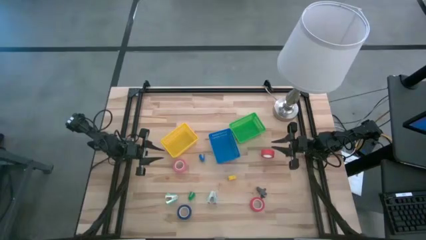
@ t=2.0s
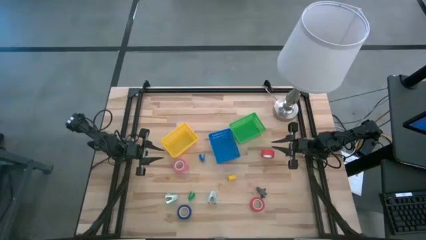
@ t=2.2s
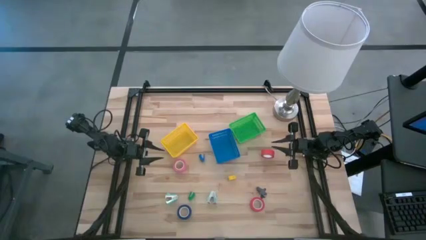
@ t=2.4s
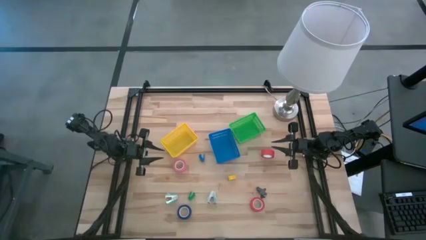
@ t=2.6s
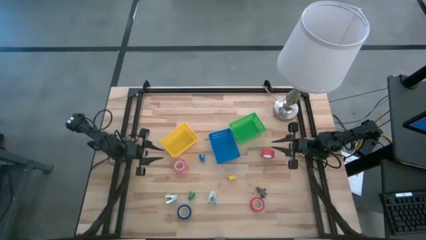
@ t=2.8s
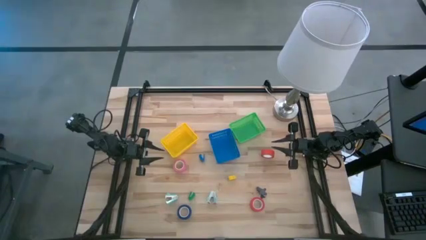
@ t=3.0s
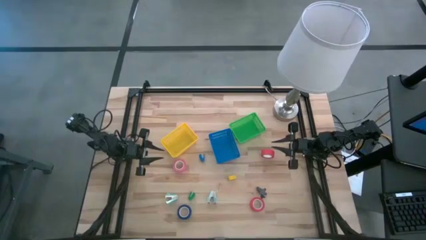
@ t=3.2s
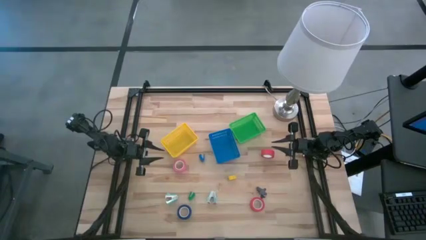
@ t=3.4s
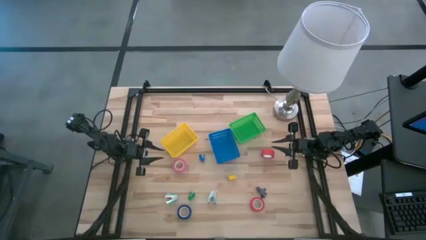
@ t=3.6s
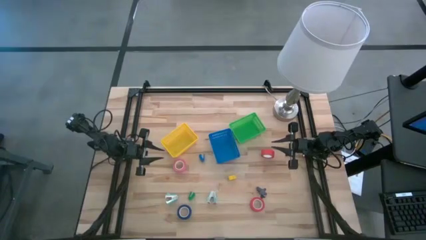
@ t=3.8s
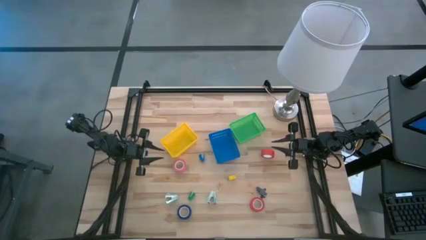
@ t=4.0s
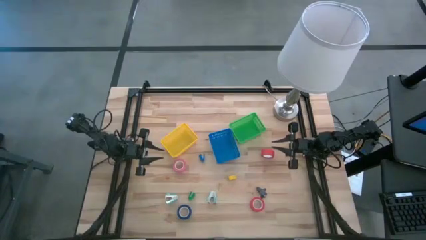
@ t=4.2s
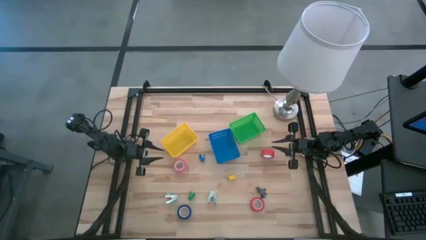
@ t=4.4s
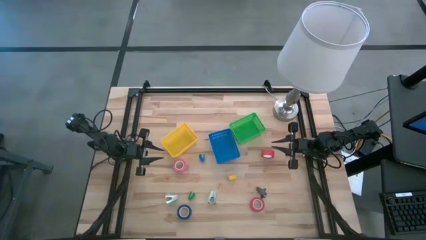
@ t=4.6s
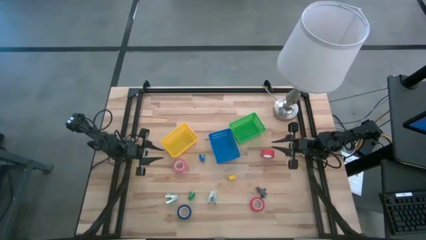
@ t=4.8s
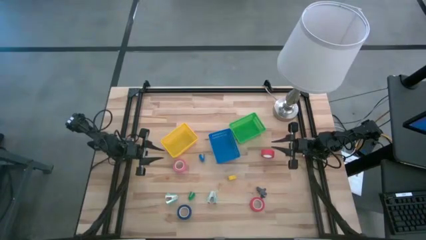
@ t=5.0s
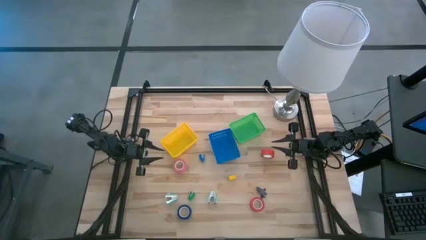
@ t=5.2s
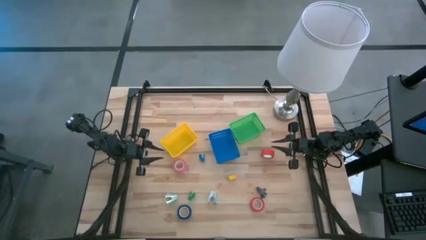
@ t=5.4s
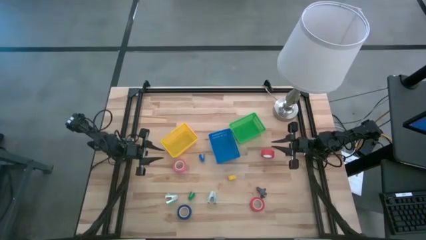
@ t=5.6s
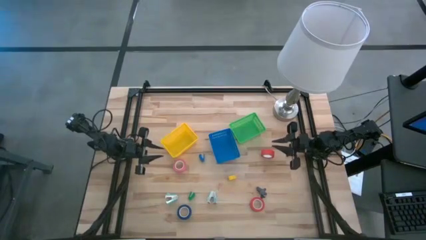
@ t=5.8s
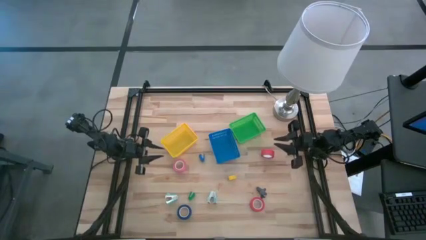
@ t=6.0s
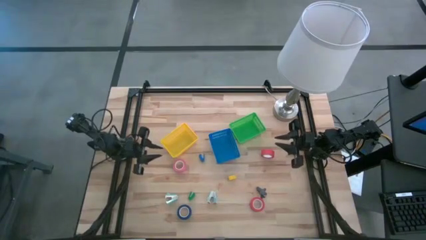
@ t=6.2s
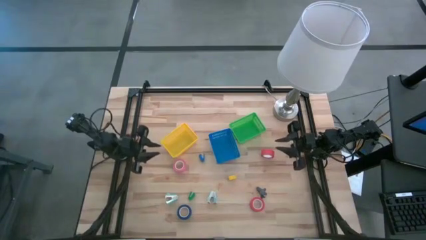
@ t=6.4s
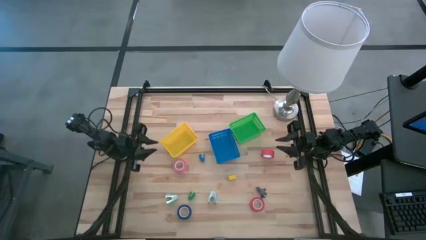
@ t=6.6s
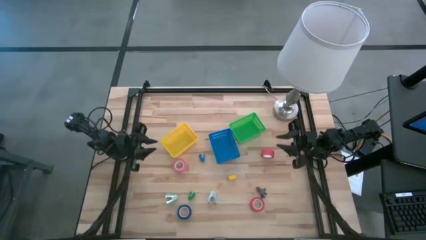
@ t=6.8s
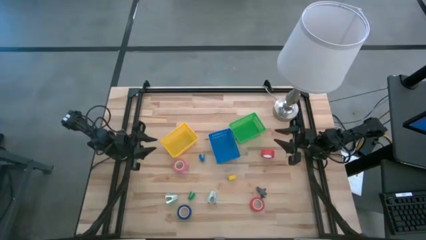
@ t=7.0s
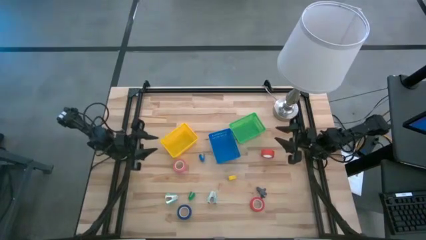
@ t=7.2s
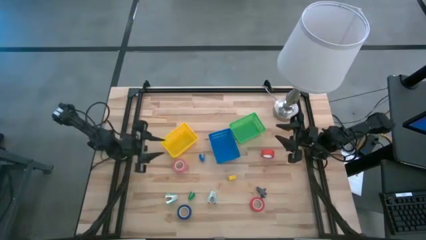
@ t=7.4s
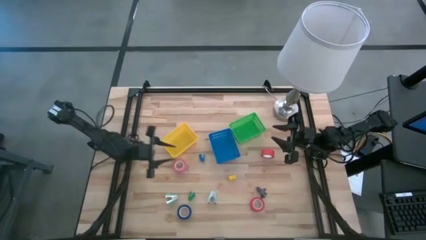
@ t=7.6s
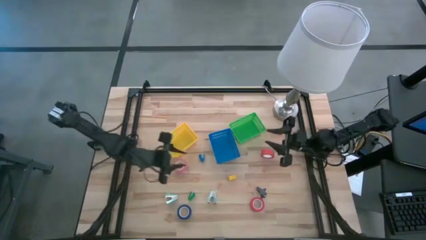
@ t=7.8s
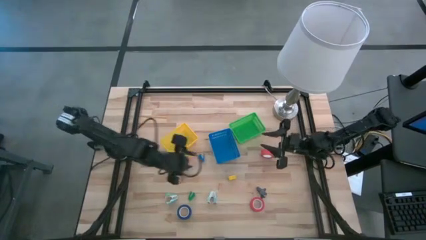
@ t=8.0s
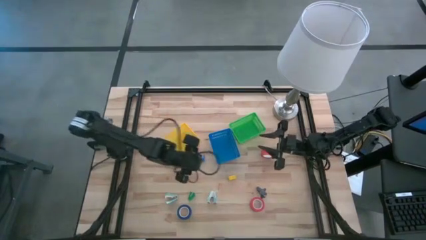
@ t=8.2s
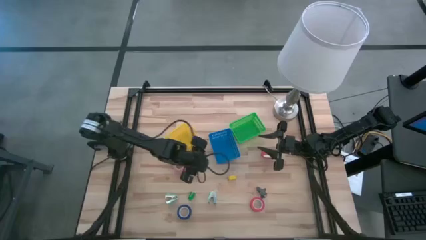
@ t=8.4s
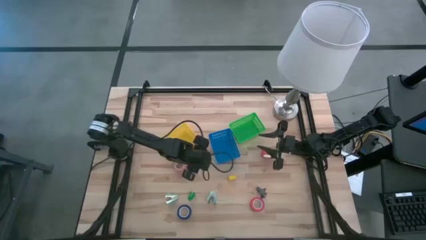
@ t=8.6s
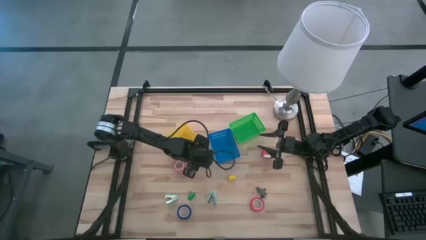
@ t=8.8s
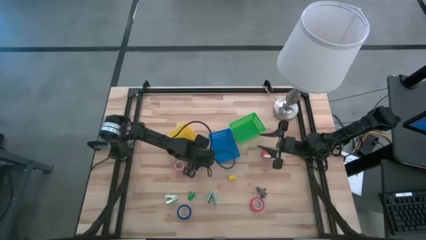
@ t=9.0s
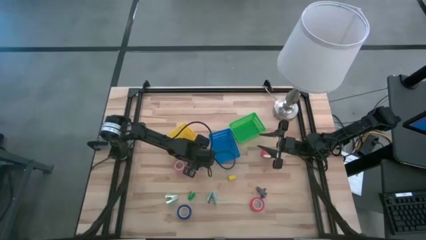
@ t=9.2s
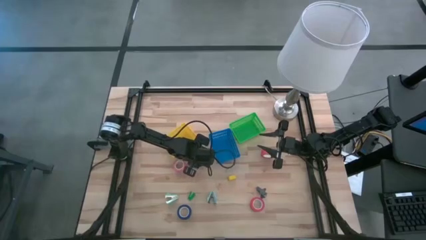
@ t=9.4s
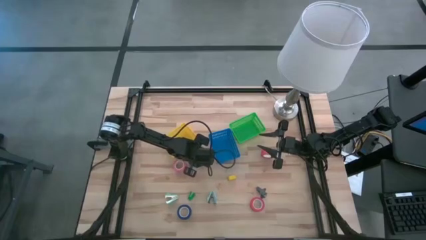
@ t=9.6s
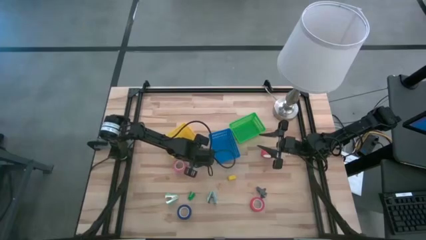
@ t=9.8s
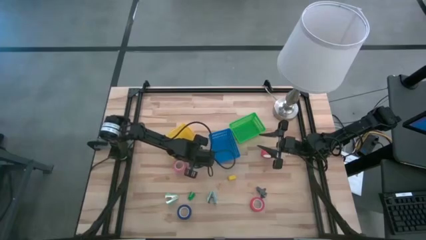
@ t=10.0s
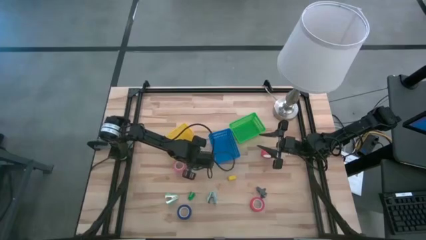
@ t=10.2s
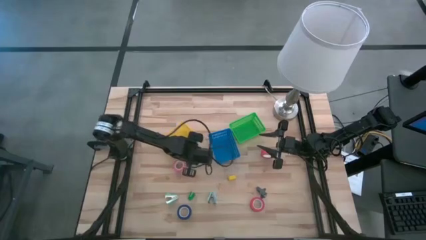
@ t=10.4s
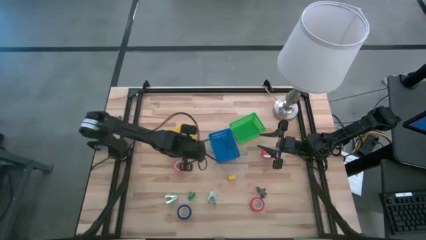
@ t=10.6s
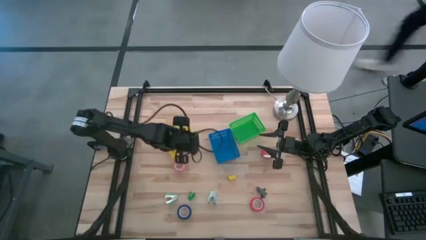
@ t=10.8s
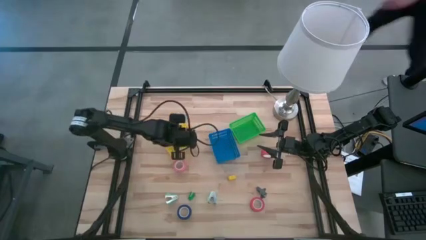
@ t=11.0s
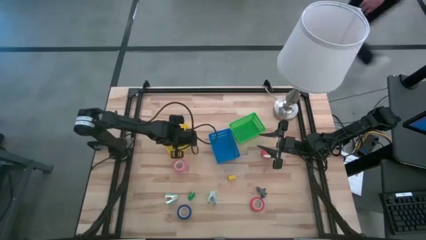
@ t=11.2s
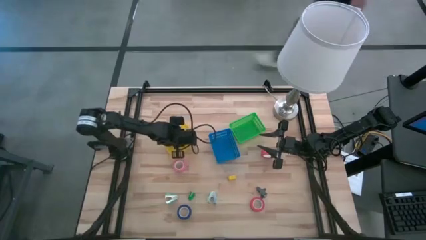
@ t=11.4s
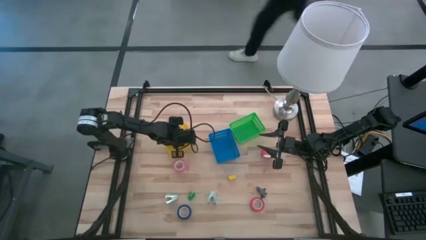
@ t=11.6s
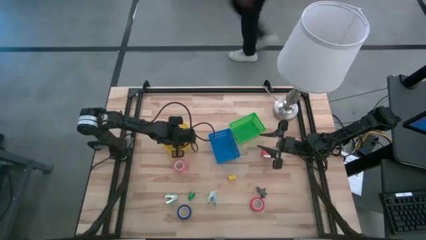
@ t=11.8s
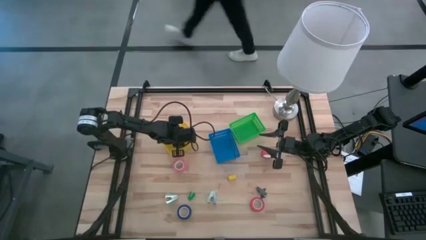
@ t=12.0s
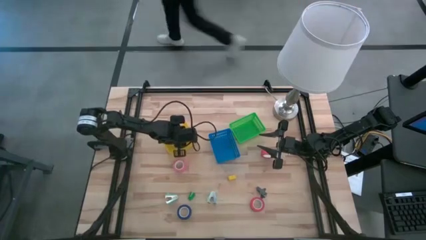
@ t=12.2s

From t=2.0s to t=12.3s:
Task: Pick and place Stapler, Stapler remover, tape
Put the blue stapler into the yellow bin

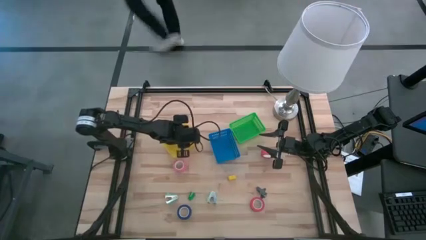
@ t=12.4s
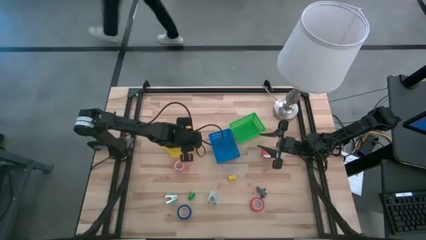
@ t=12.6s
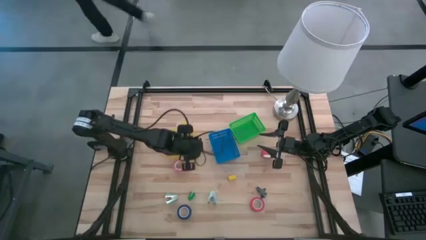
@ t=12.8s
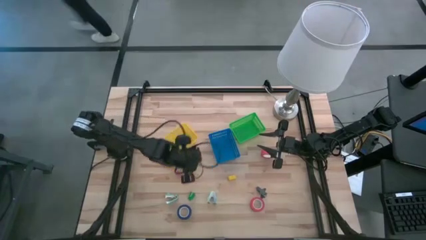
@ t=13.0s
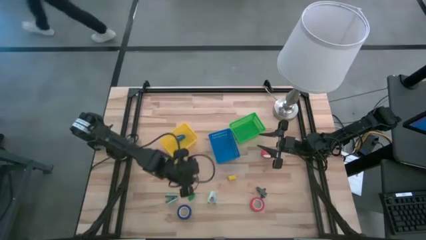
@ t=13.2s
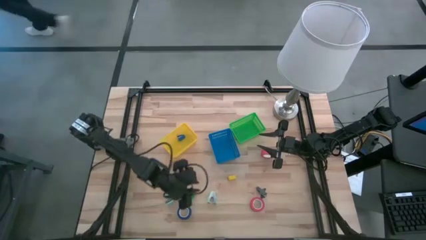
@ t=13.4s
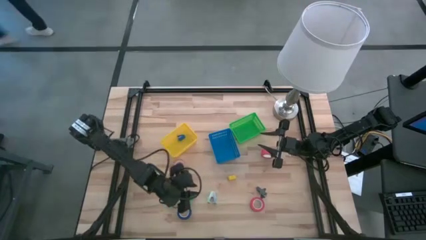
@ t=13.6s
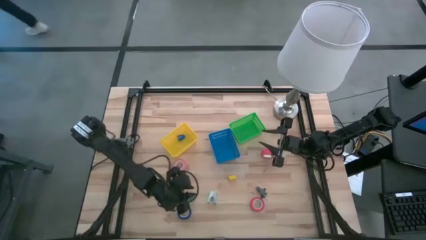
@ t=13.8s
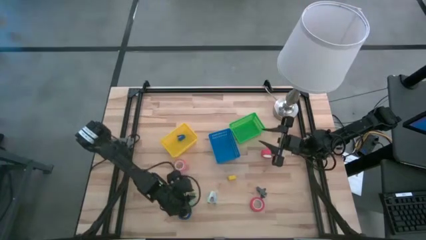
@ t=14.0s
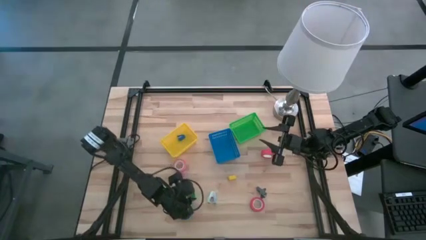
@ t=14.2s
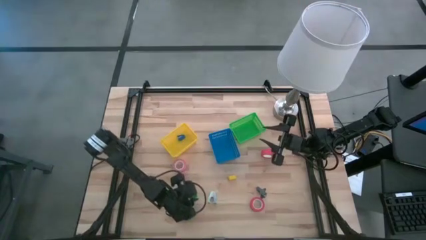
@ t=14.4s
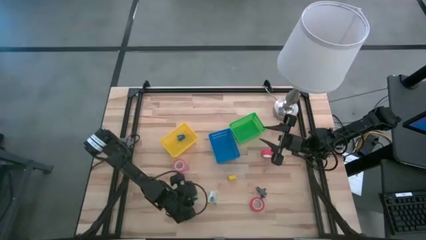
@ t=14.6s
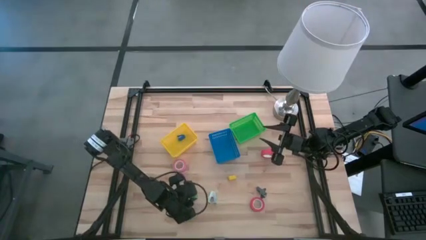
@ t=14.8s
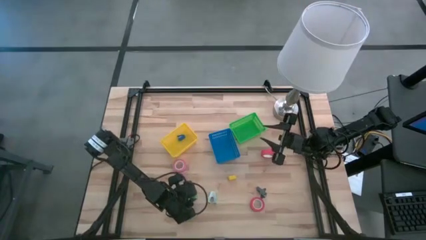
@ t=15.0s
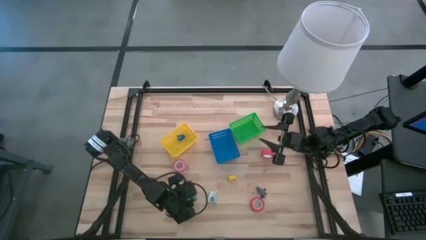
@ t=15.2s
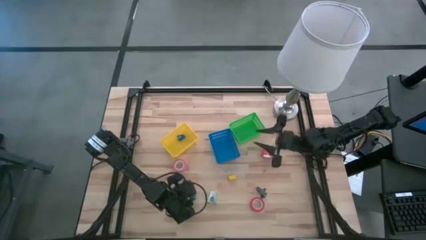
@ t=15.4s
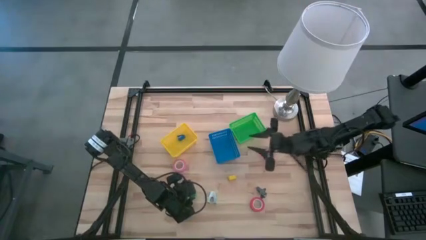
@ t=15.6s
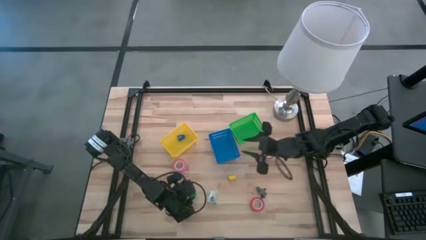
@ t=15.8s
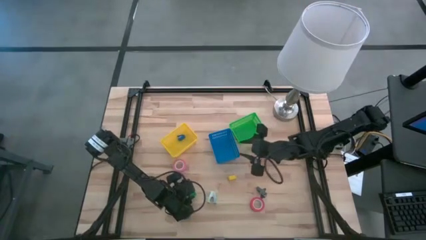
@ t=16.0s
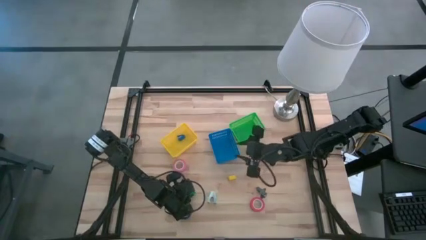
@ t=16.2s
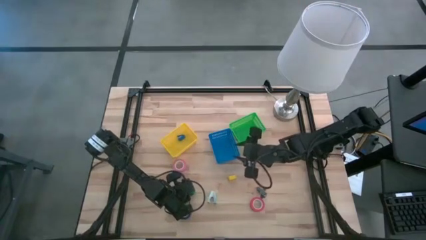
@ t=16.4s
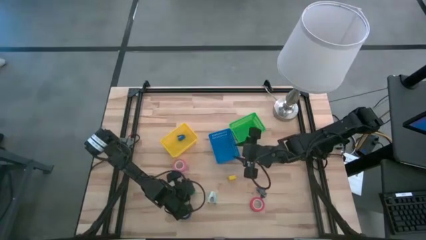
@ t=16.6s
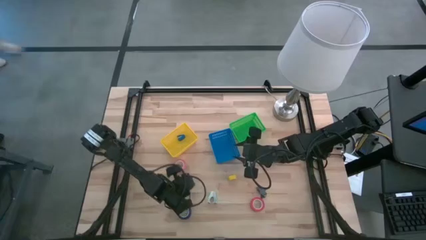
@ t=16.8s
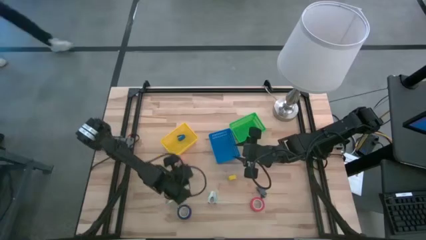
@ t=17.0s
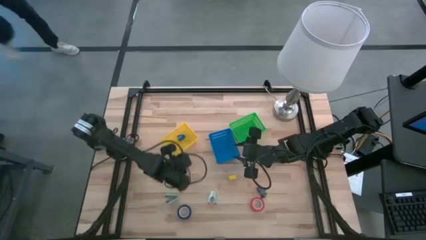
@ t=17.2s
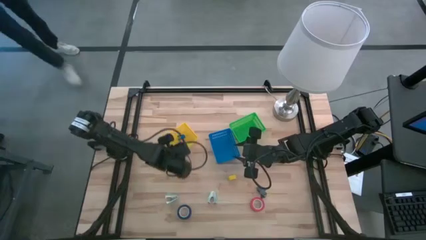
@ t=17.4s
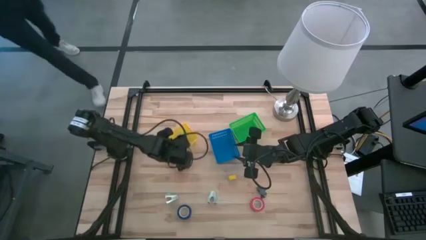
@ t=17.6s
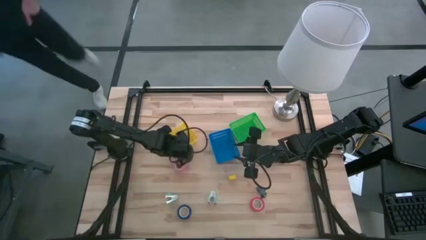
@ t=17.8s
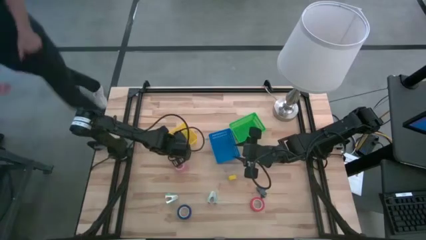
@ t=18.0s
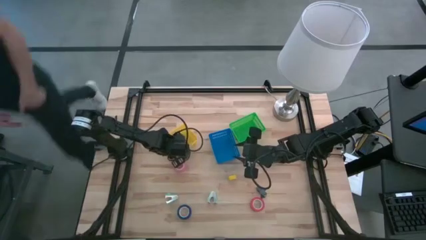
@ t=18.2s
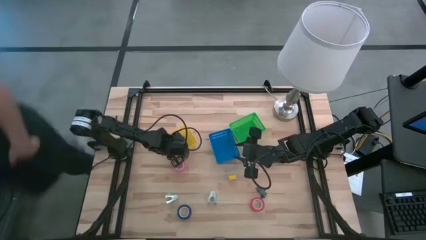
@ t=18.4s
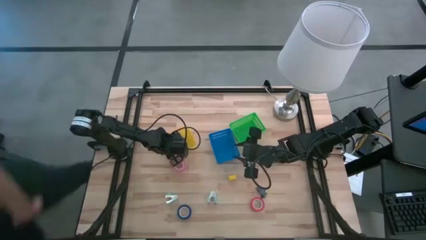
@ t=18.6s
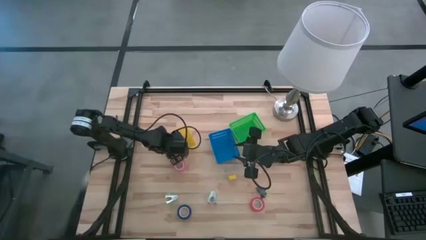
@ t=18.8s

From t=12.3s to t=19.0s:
Put the green stapler into the yellow bin
